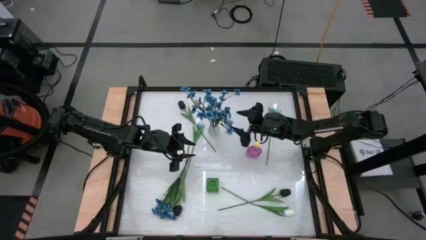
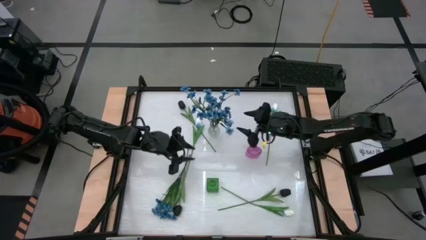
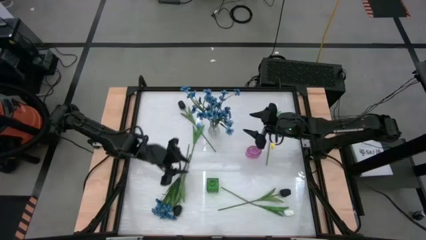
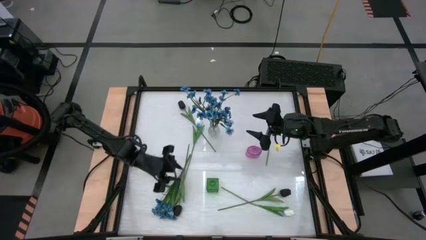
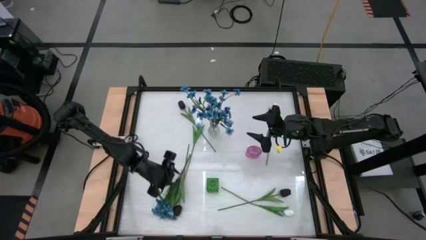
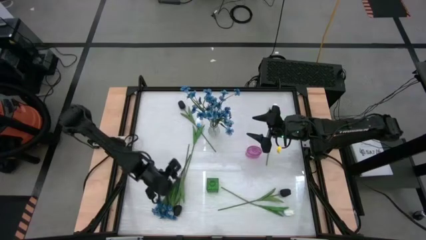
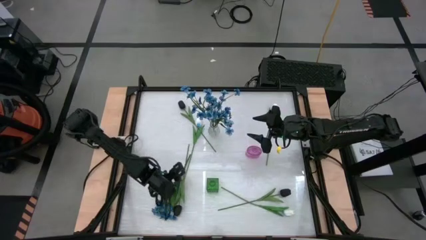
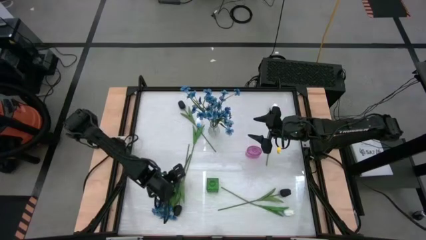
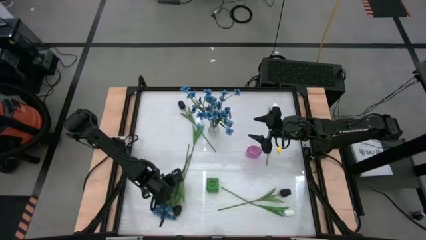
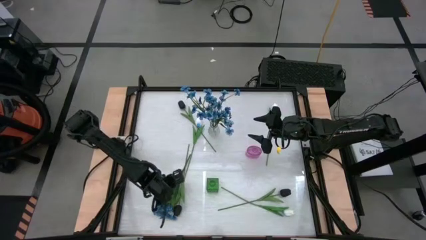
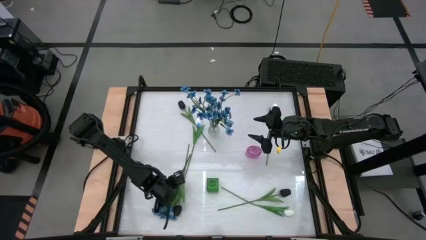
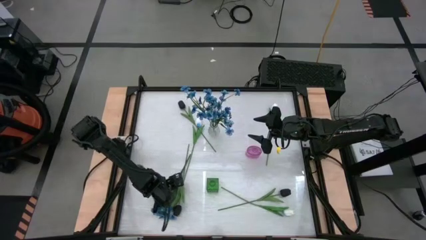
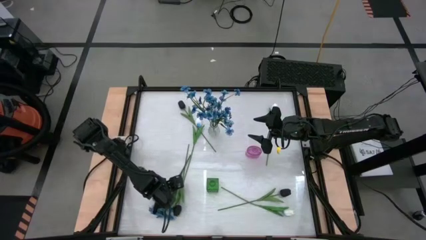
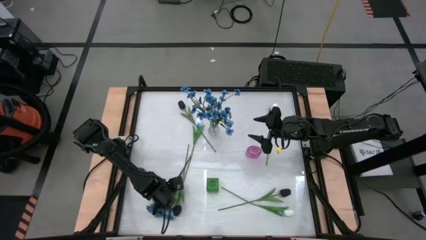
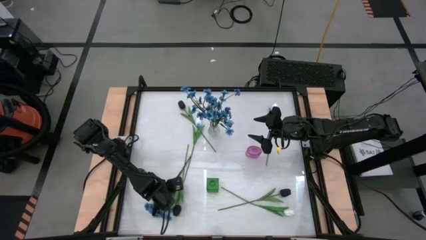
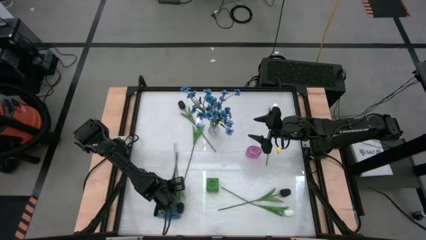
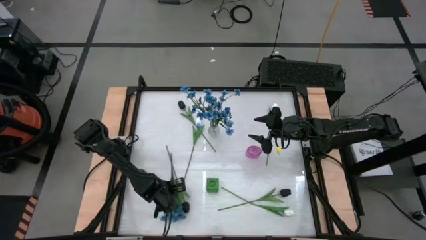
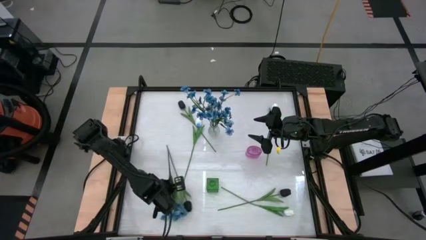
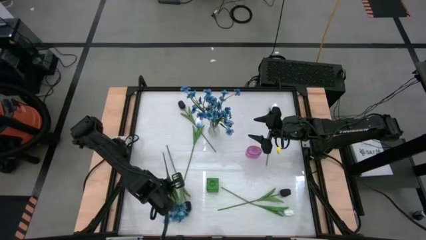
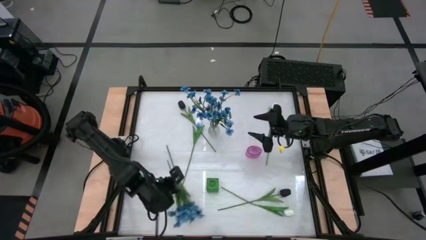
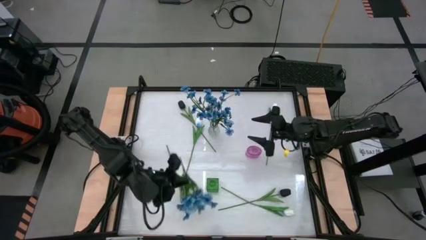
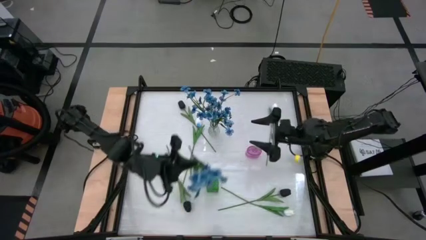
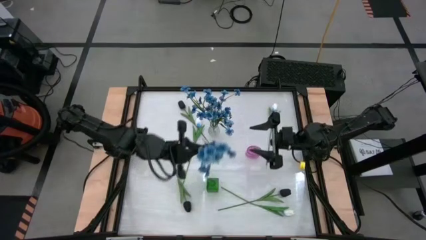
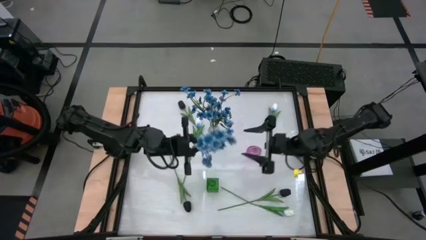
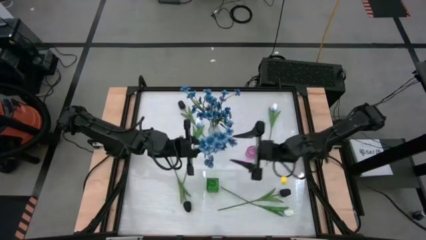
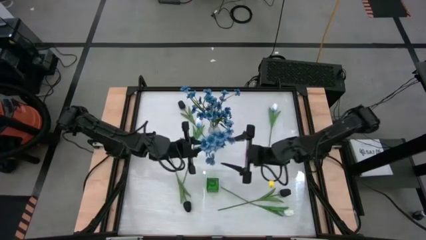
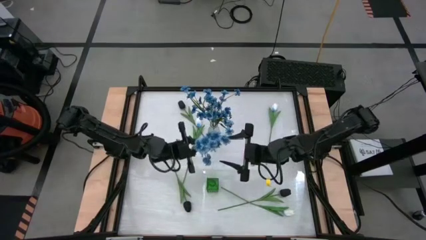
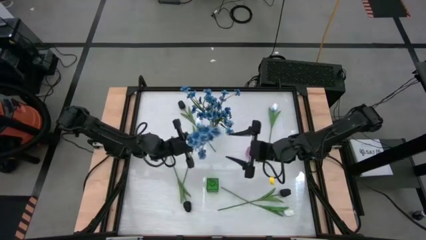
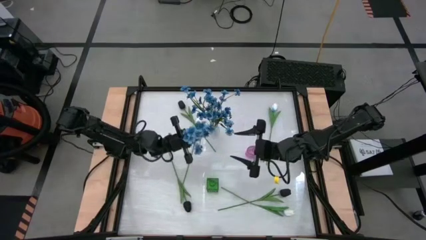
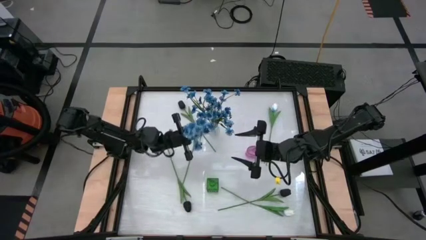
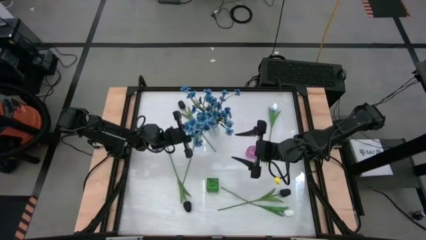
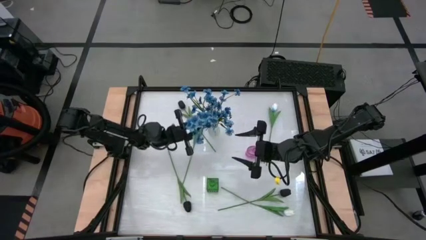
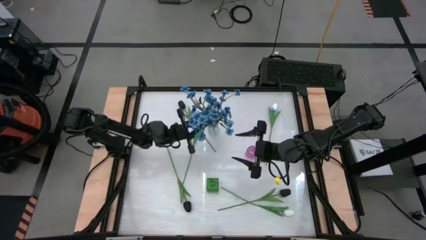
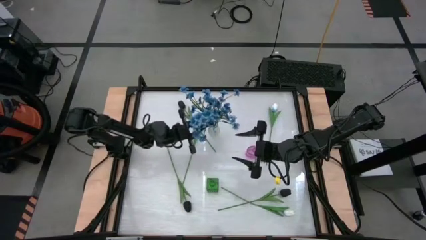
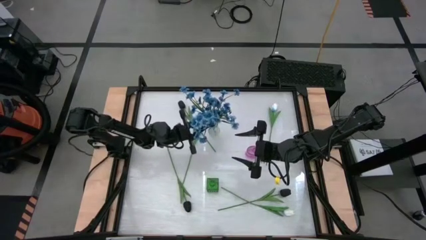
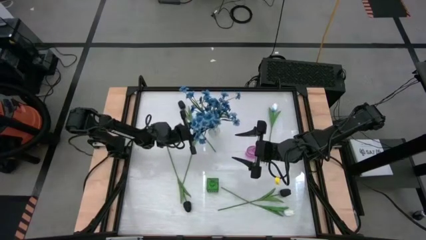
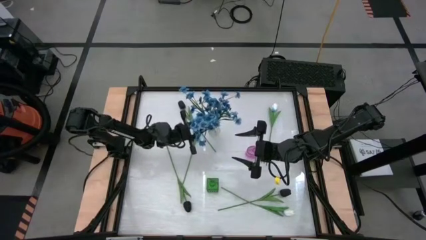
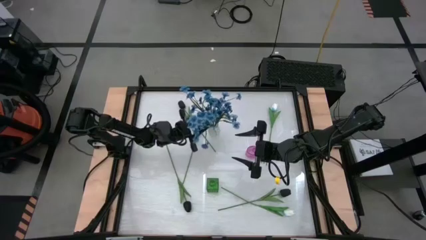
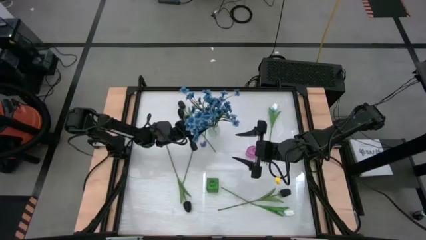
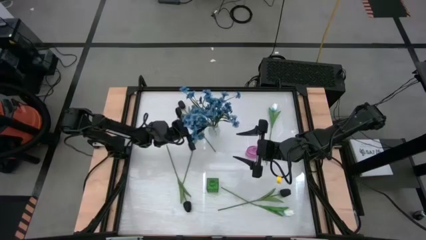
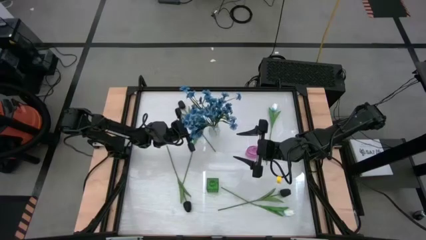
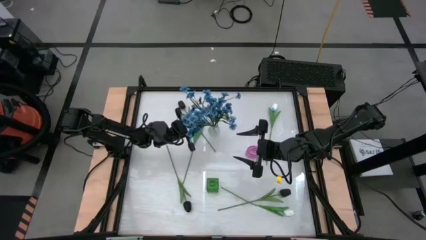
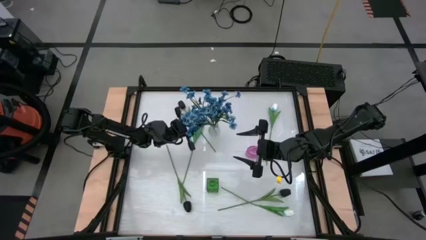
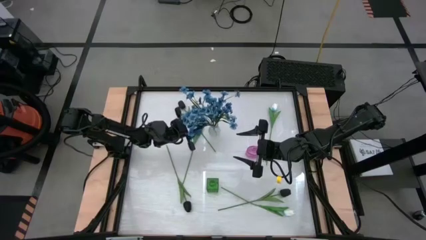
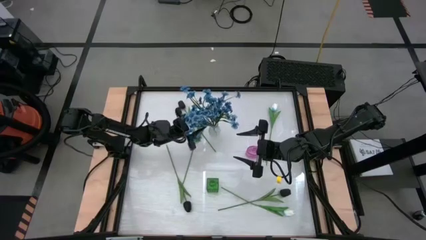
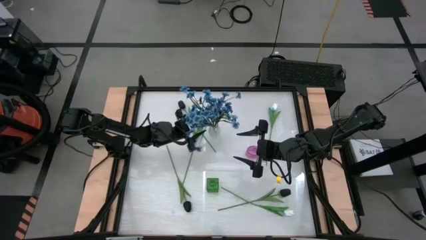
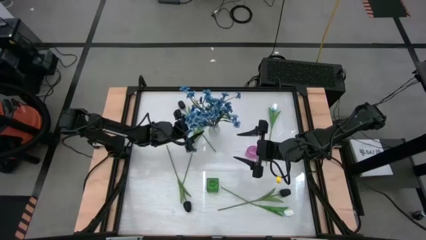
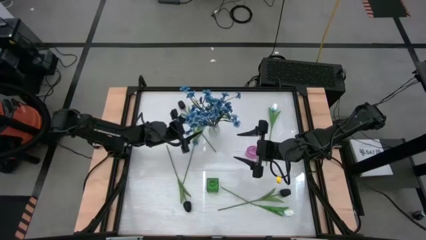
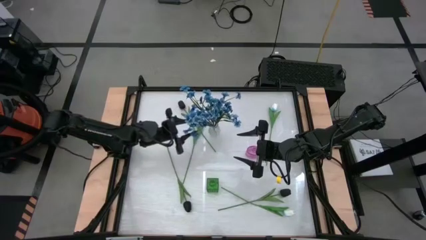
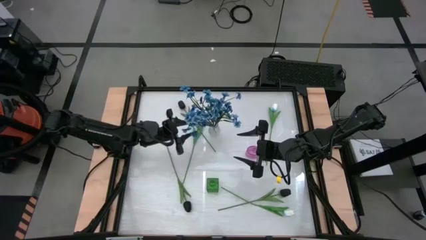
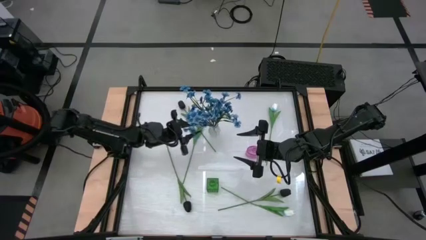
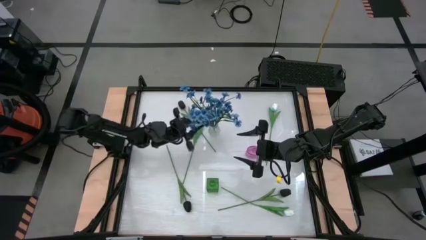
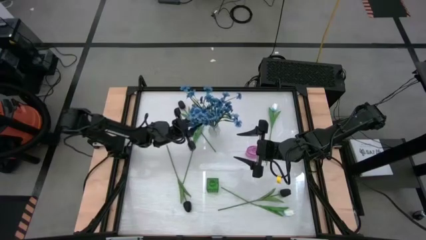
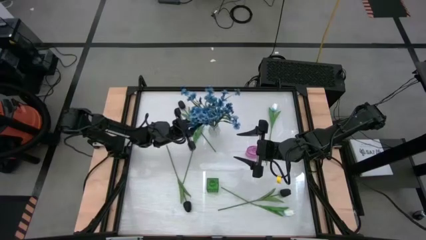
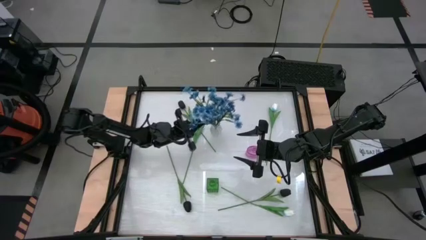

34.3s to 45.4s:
Task: Sort flowers into vase by color
Put the blue flowers into the transparent vase

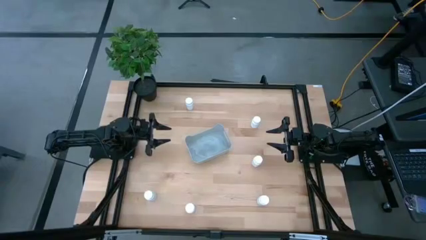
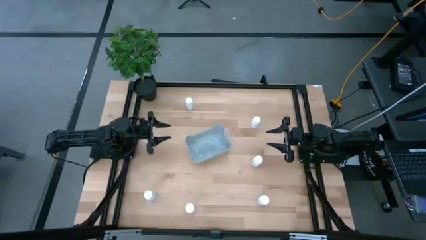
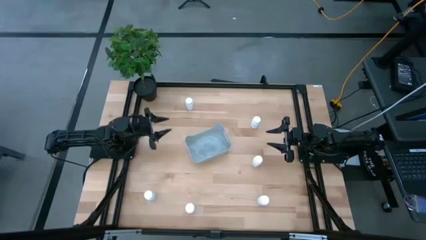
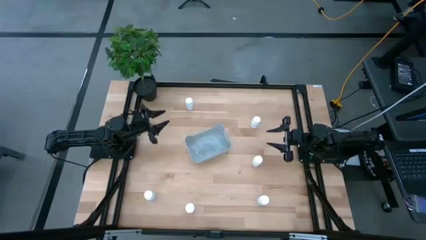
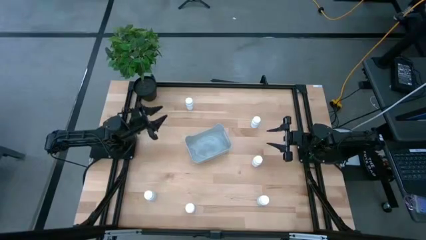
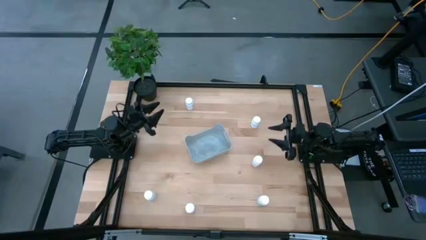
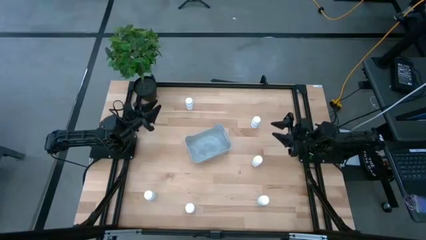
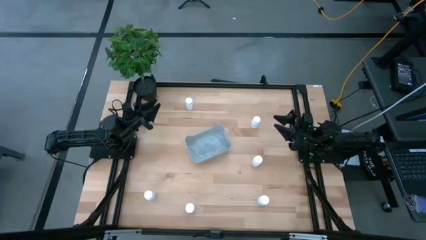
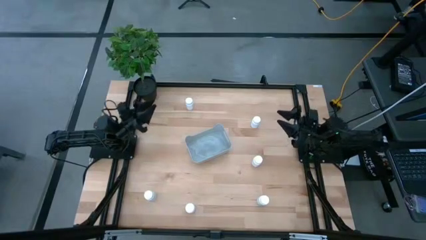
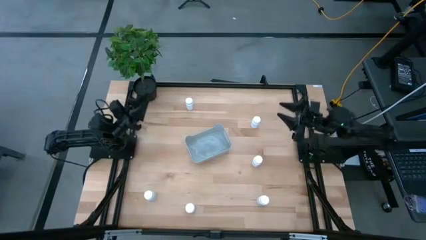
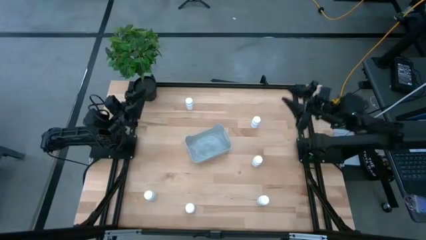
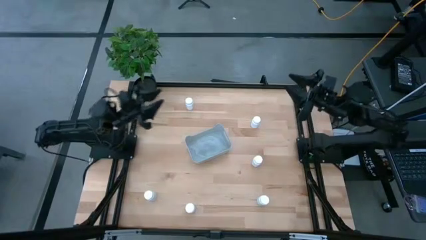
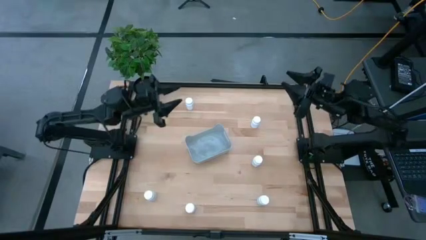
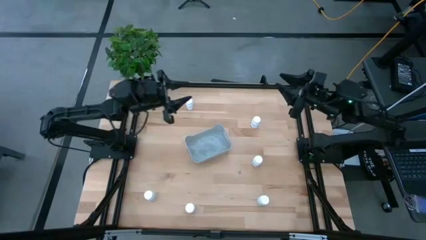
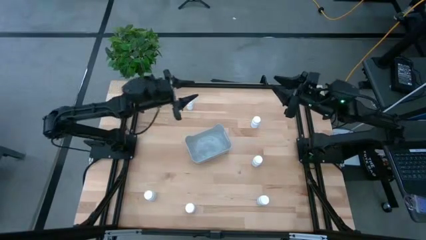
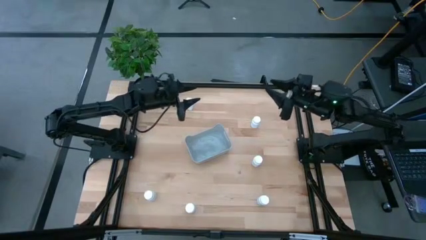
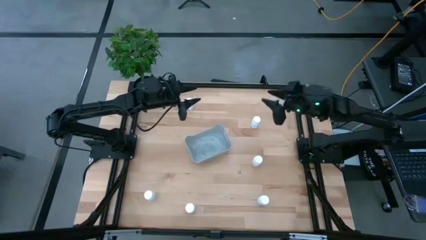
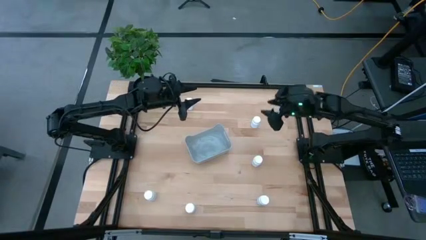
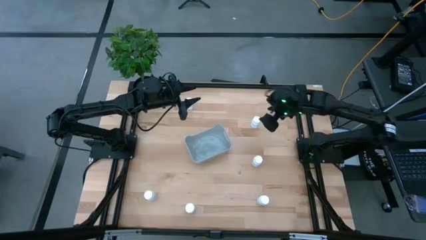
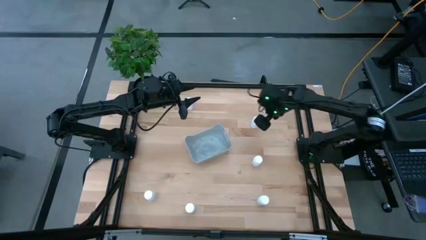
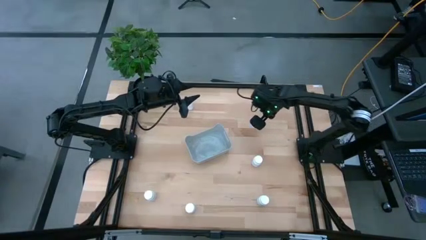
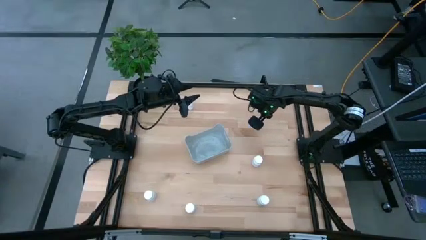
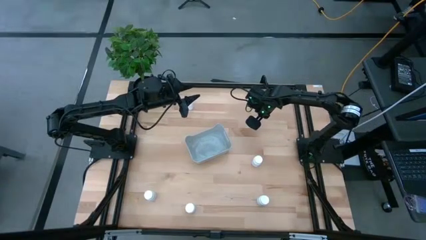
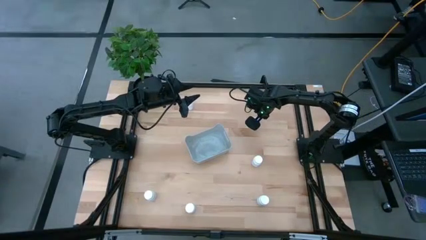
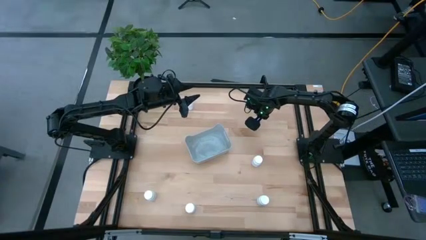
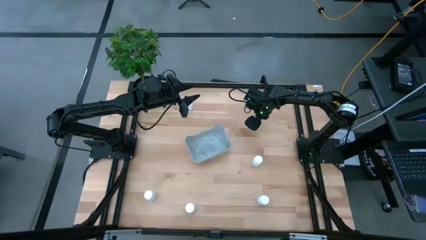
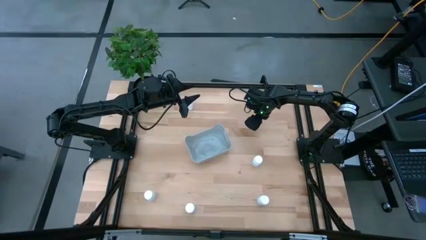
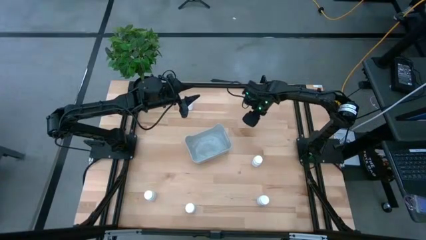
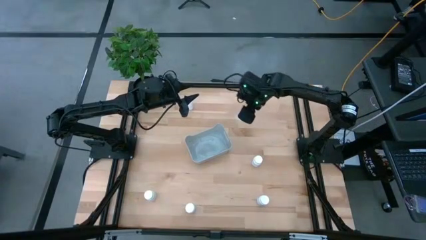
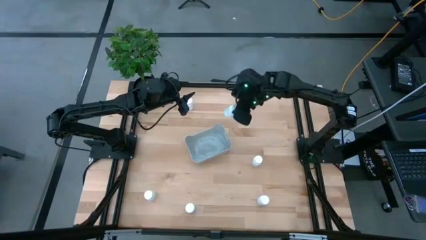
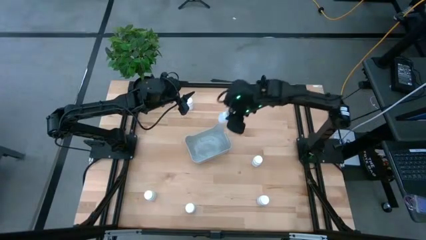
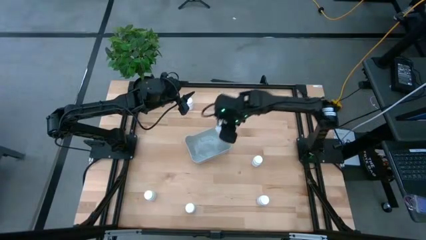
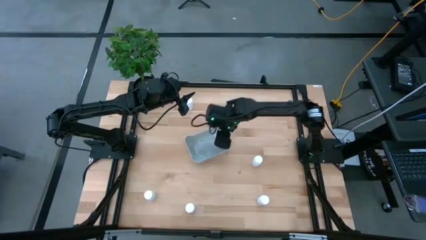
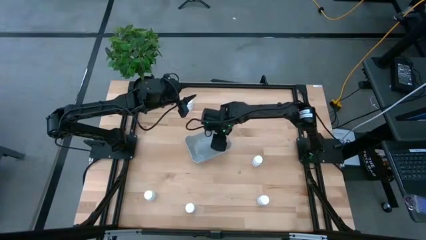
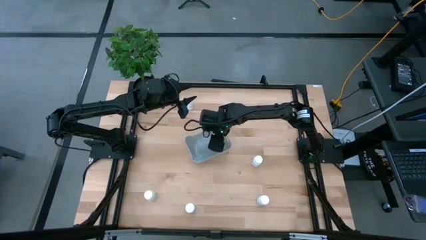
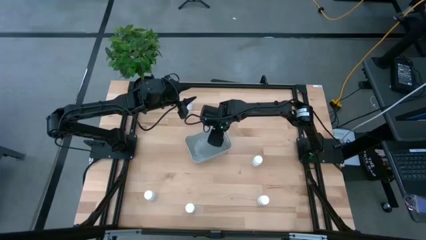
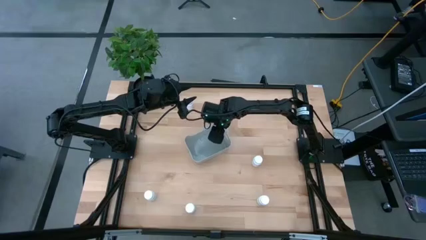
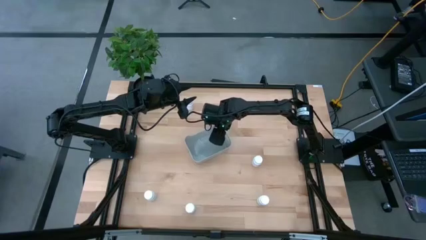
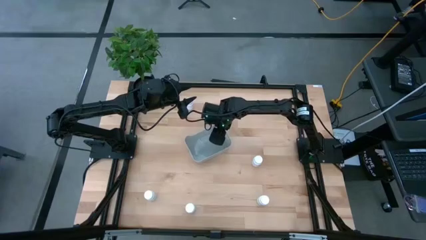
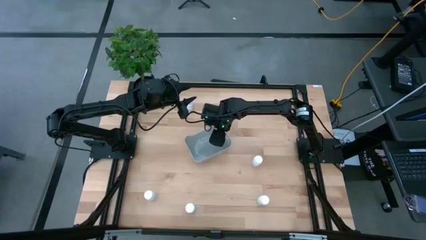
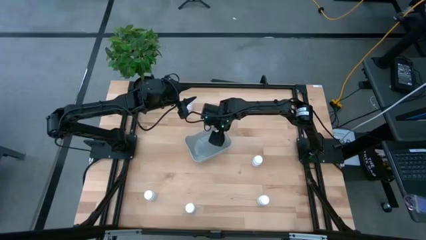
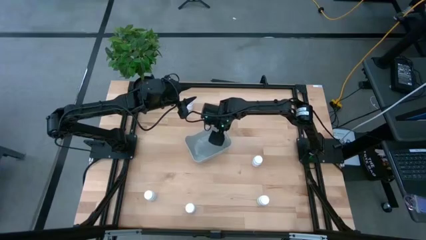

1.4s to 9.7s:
Task: Pick and place pill bottles into a basket
Put the white pill bottle into the white bin
